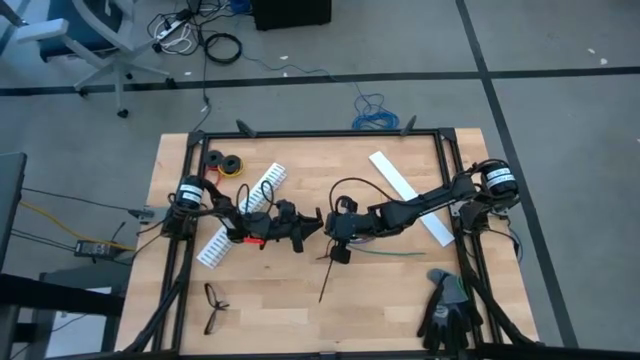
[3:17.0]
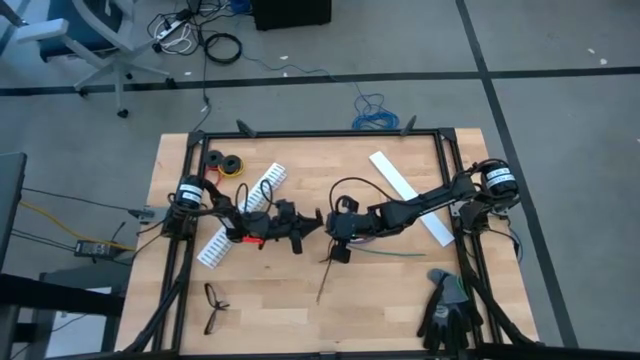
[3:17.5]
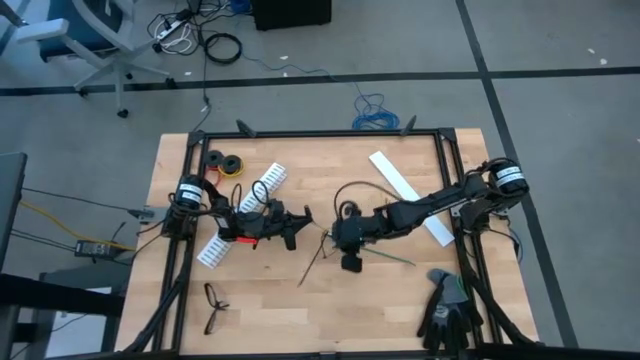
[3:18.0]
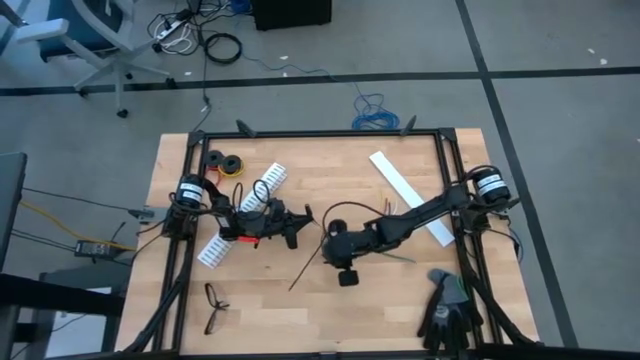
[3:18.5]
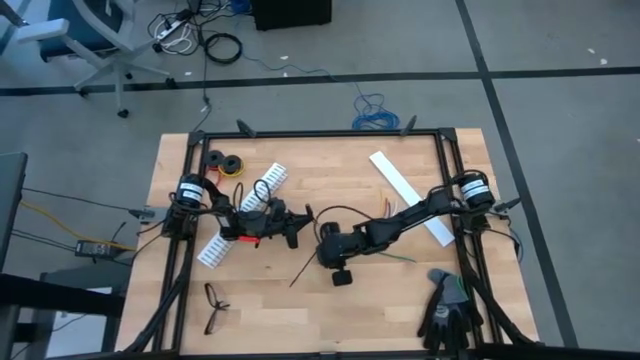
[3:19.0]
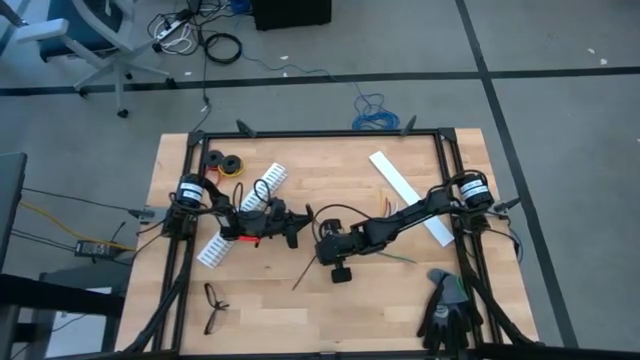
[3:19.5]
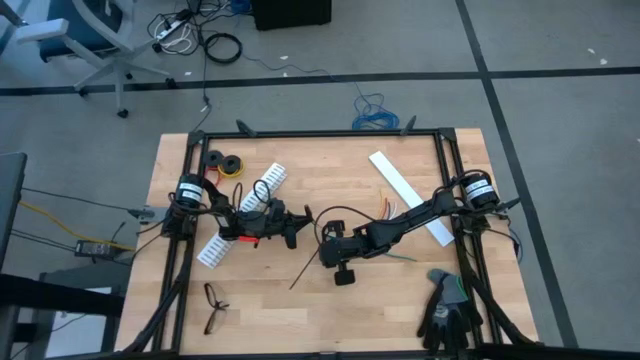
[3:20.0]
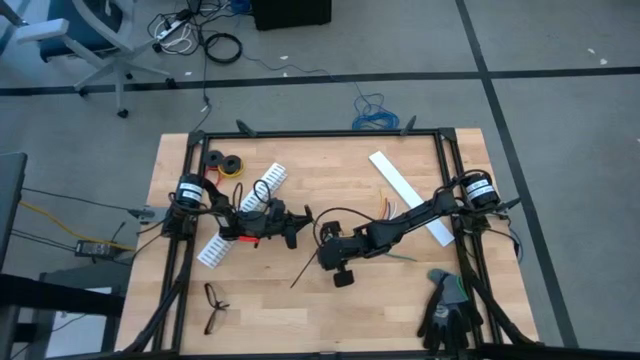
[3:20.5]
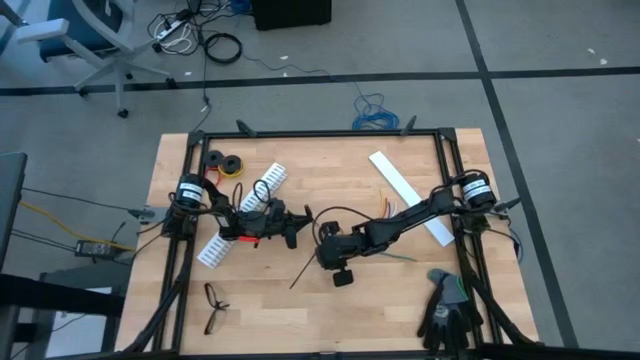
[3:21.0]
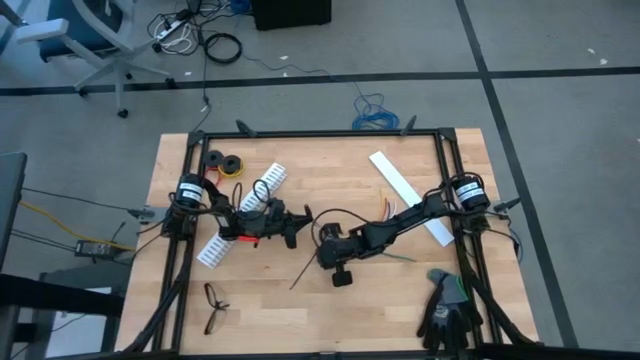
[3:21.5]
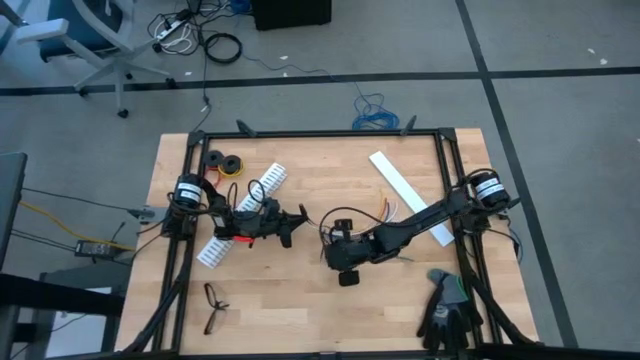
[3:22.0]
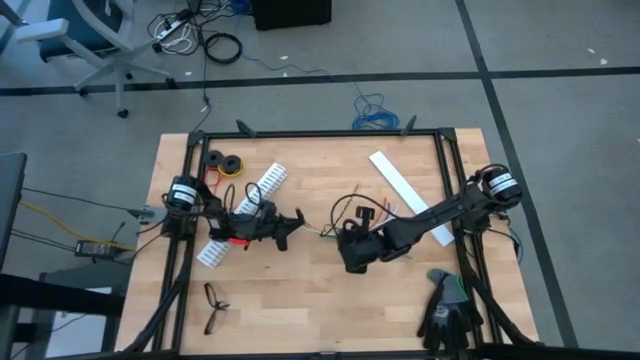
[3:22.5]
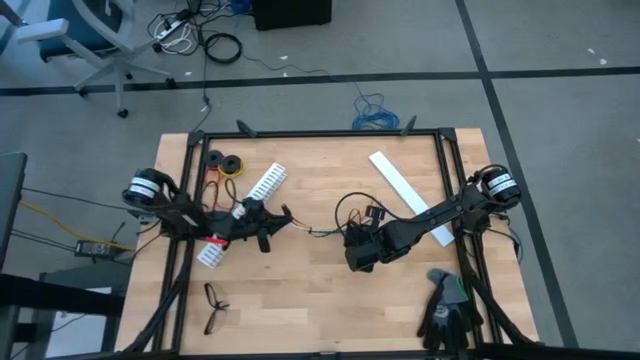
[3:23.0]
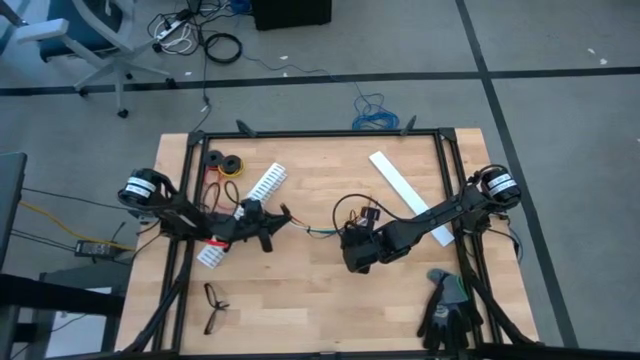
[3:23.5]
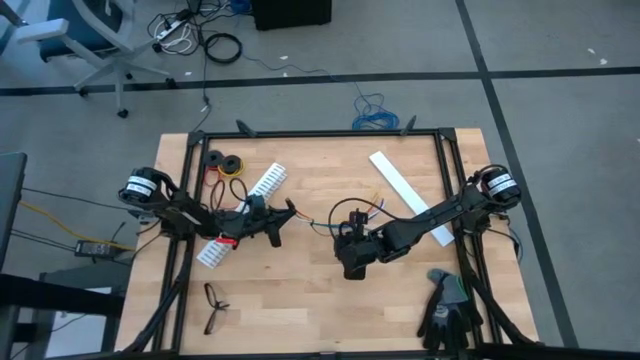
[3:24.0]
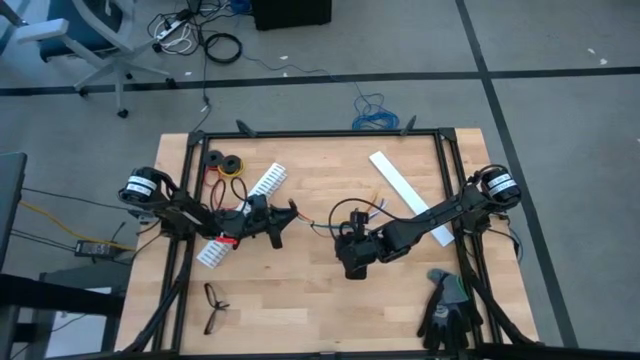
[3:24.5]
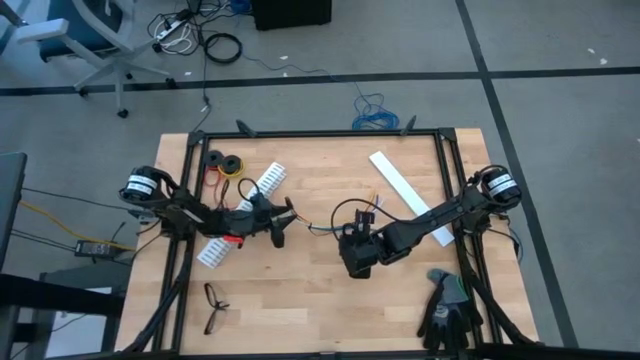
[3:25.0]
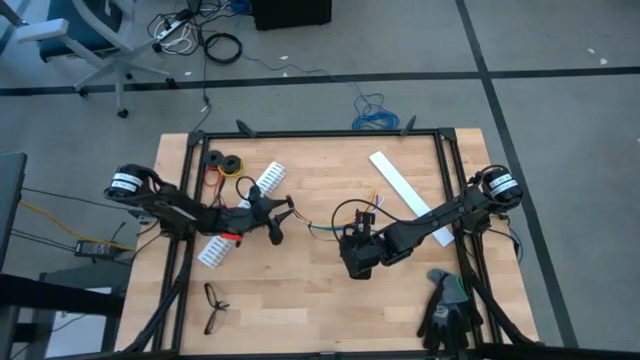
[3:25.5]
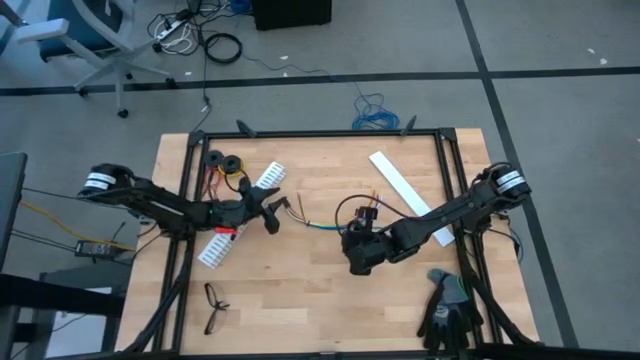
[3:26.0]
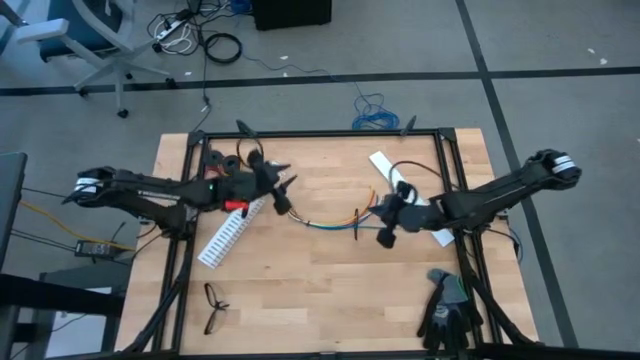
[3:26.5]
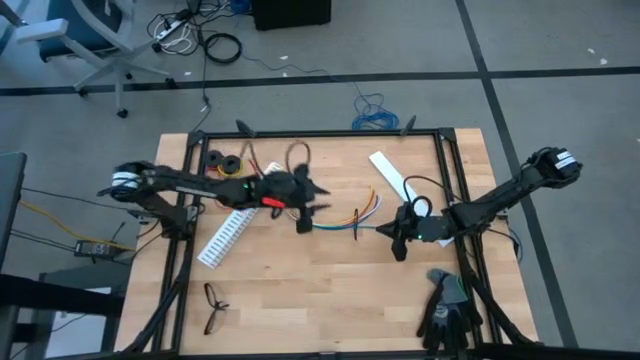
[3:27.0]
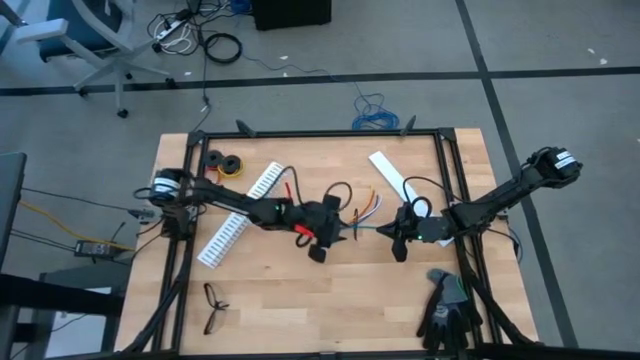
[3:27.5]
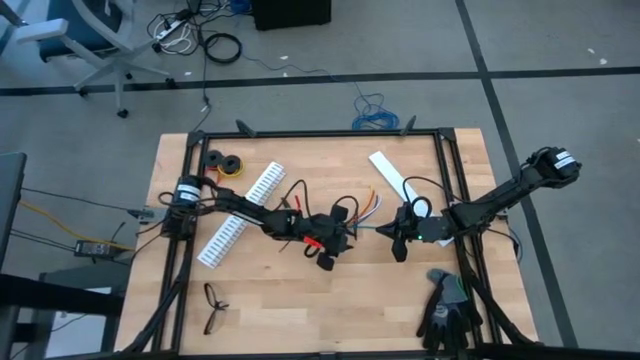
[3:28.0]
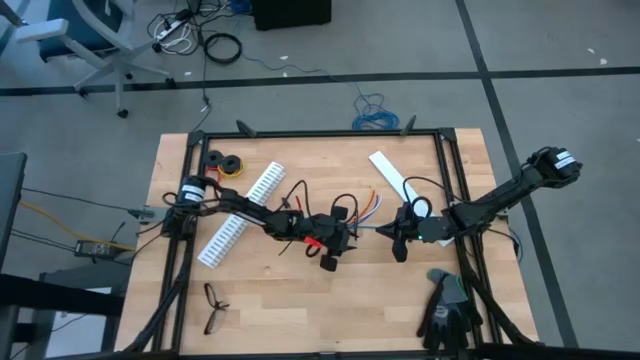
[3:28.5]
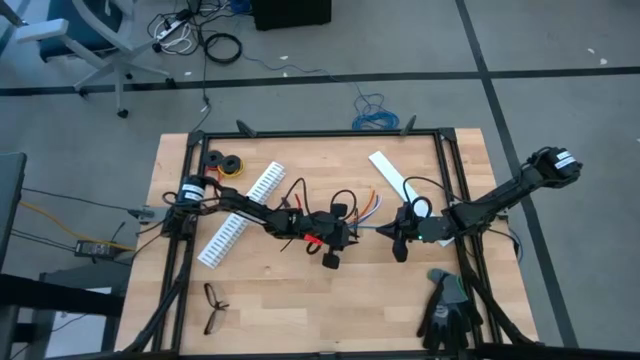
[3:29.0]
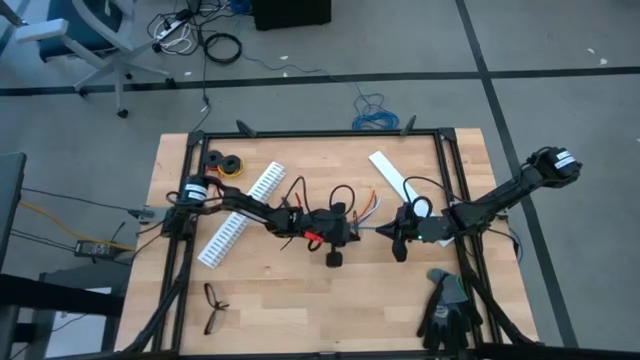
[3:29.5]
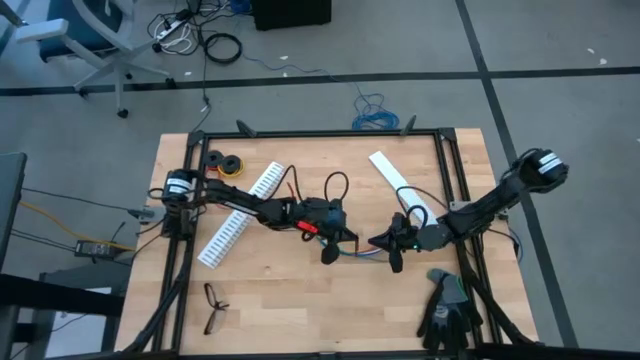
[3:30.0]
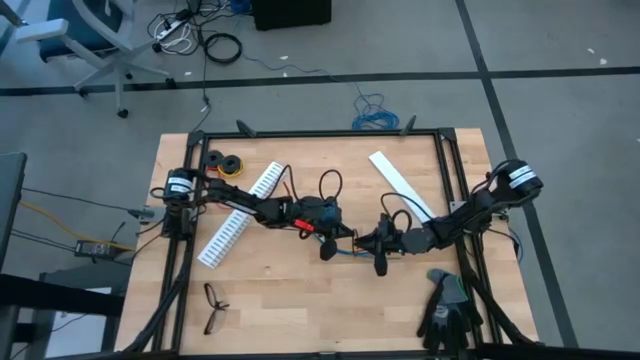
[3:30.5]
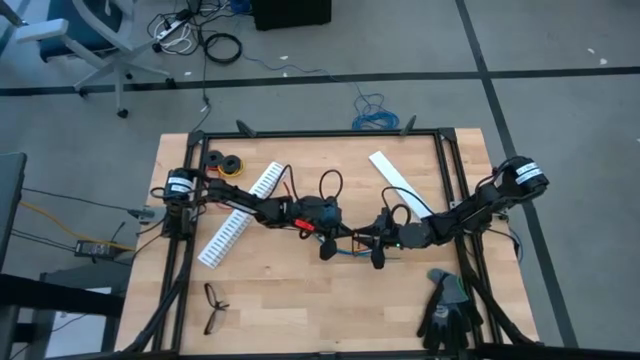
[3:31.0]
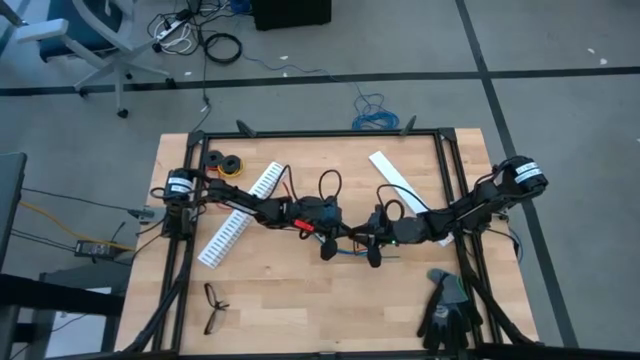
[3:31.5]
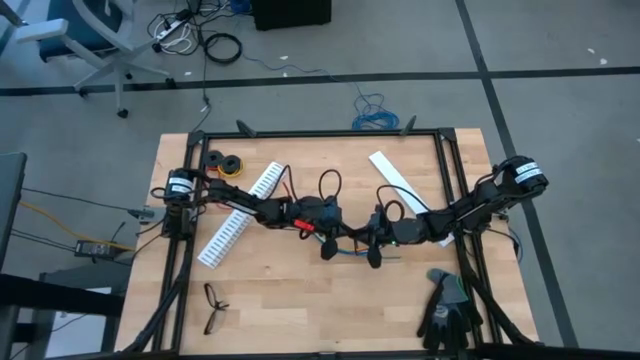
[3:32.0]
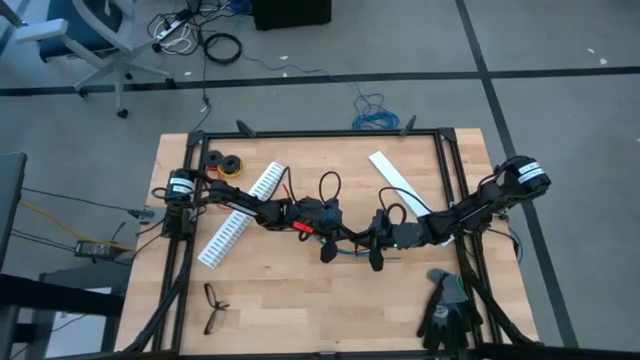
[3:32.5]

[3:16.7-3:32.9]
Task: Ziptie cables
Wrap the cable wires with the black zip tie

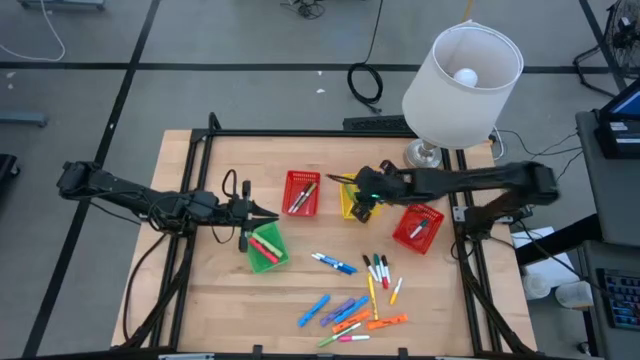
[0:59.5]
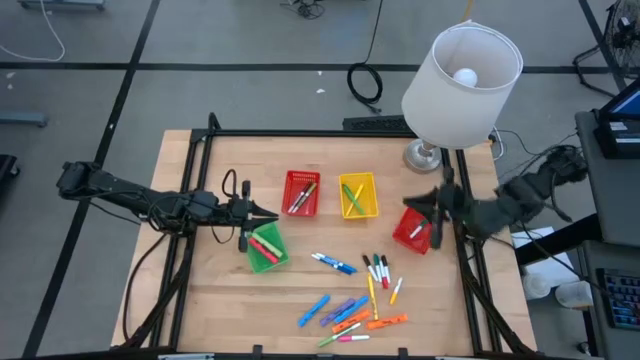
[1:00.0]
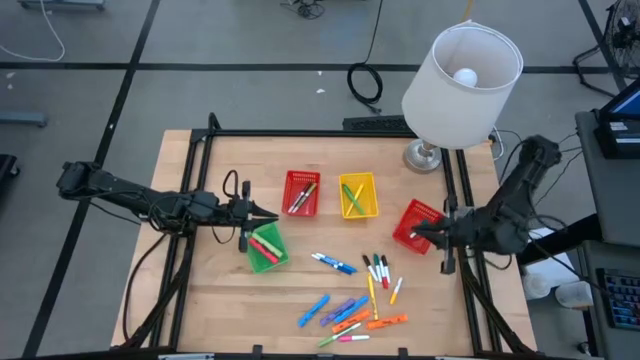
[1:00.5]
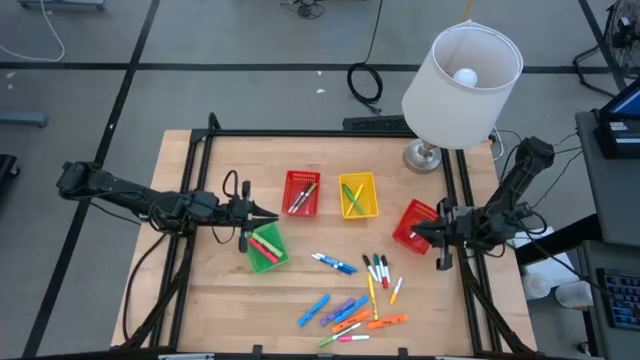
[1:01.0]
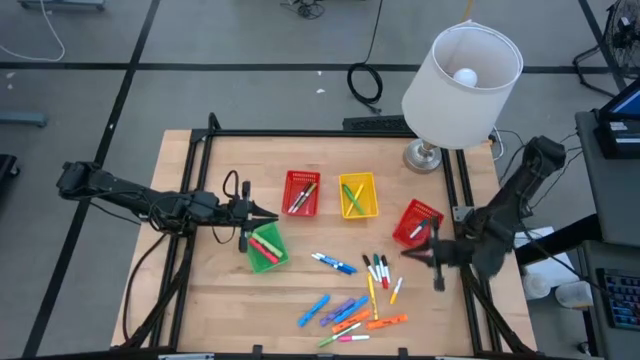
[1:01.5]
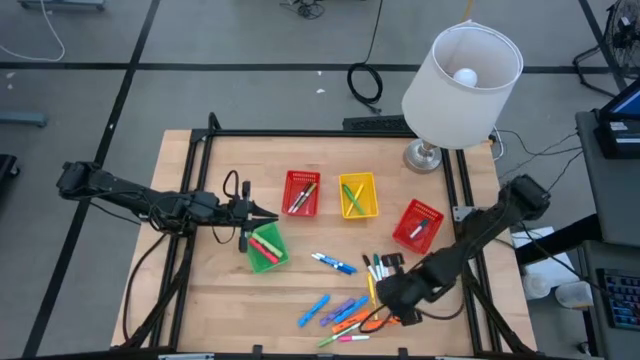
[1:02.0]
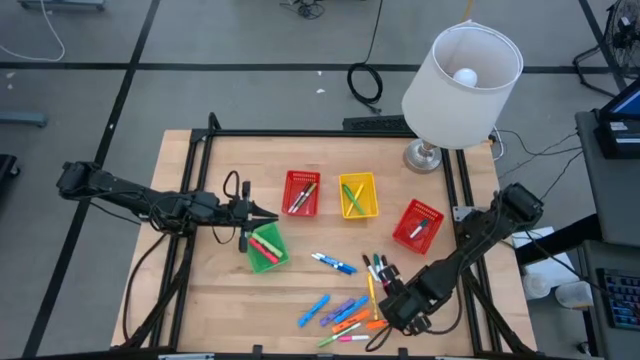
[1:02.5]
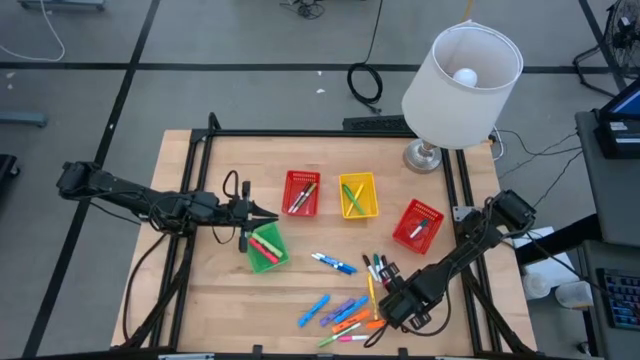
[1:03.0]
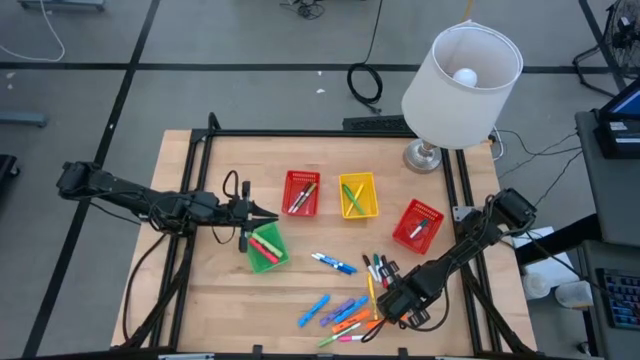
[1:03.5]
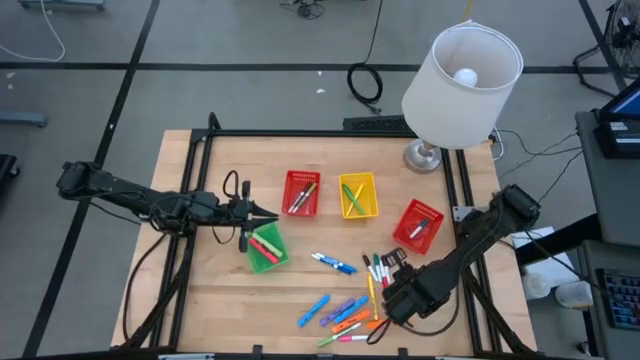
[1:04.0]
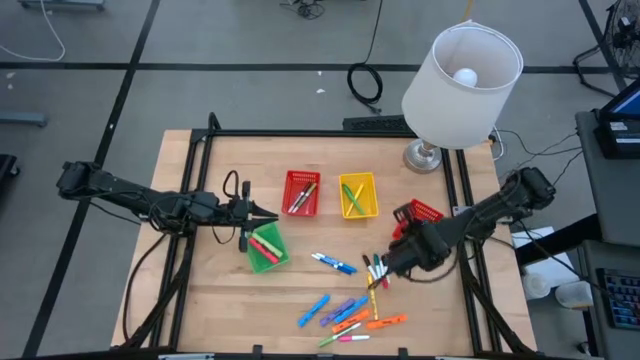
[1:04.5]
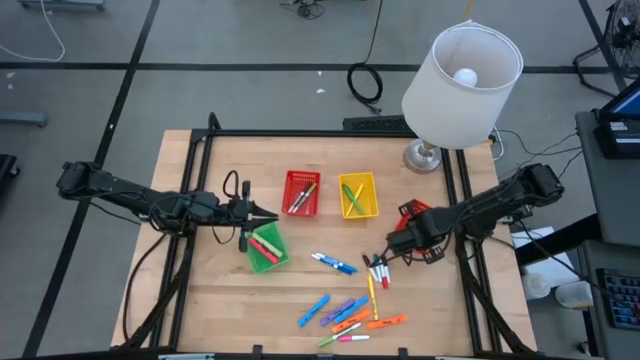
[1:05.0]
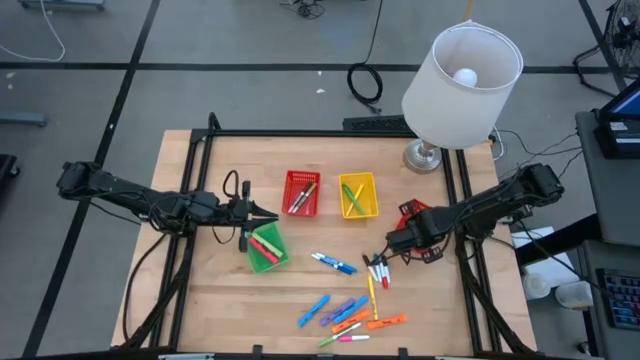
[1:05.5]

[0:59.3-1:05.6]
Task: Pick & Place Markers
Put the yellow highlighter into the right red bin
